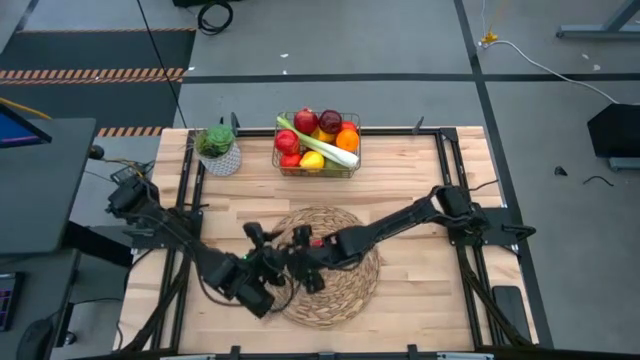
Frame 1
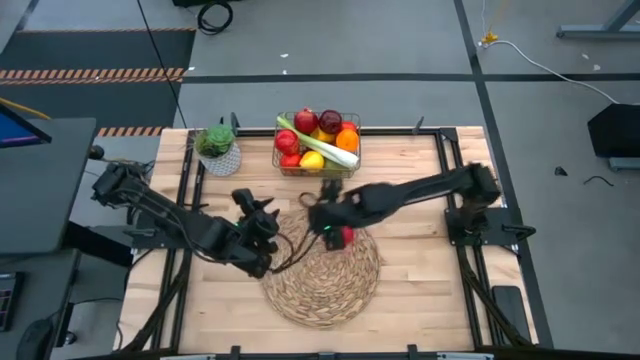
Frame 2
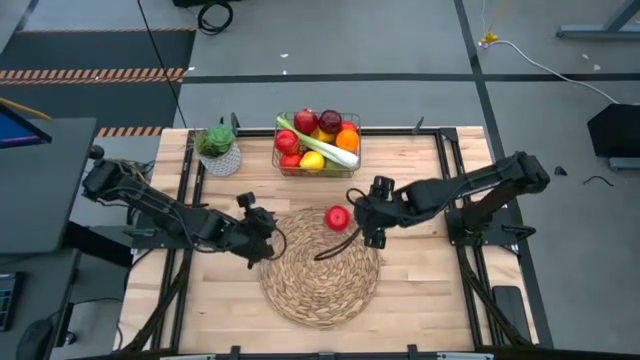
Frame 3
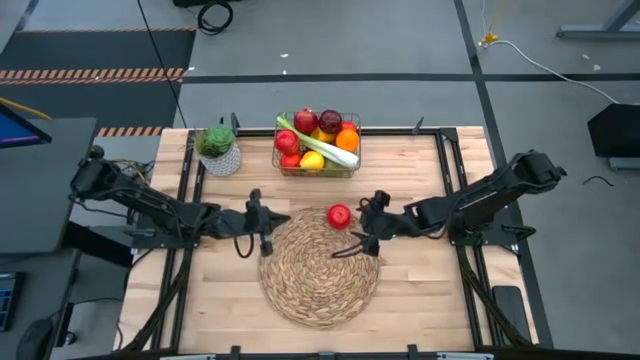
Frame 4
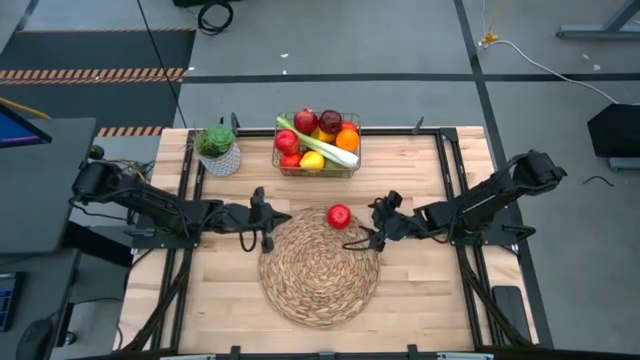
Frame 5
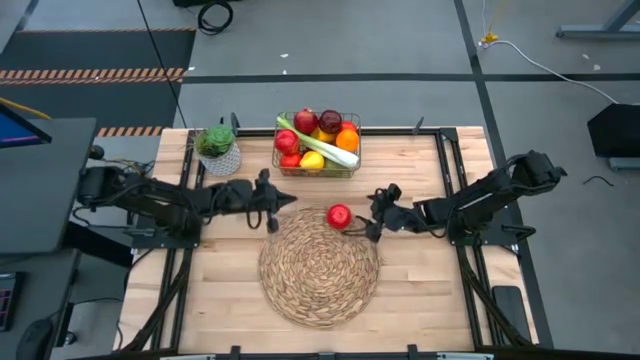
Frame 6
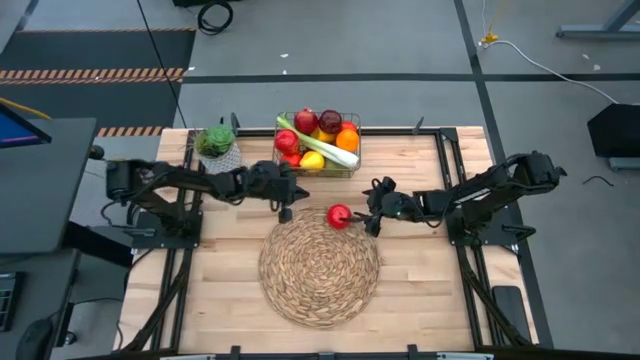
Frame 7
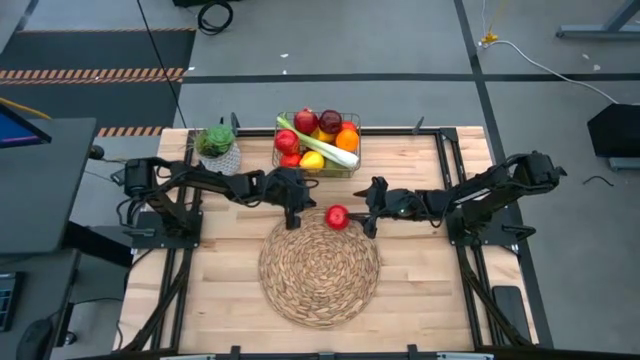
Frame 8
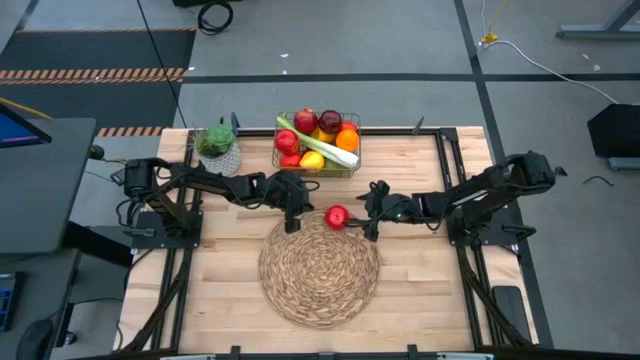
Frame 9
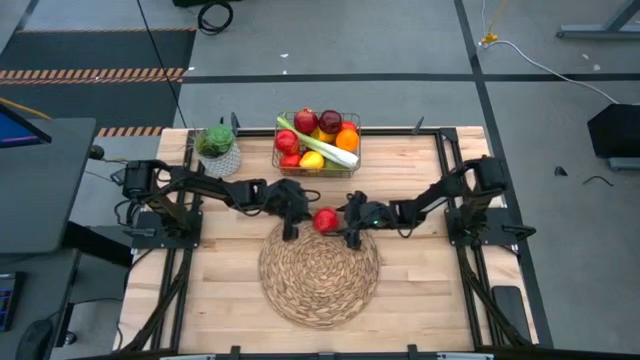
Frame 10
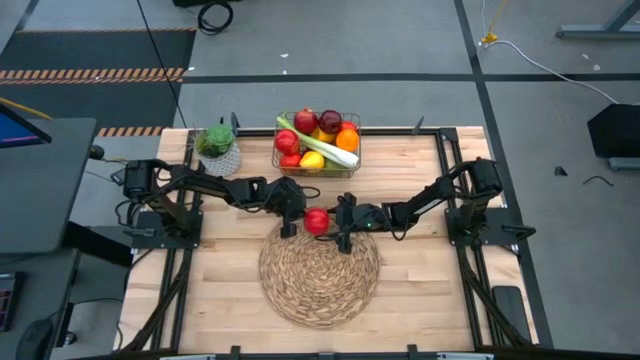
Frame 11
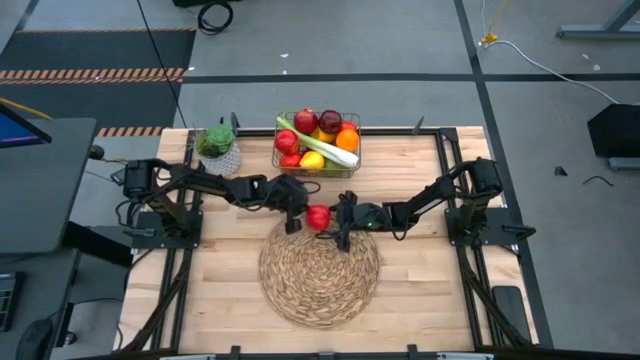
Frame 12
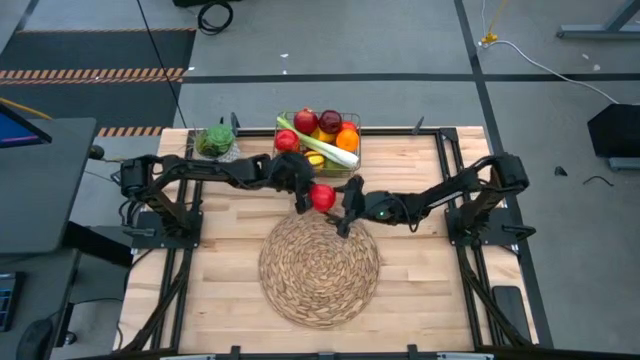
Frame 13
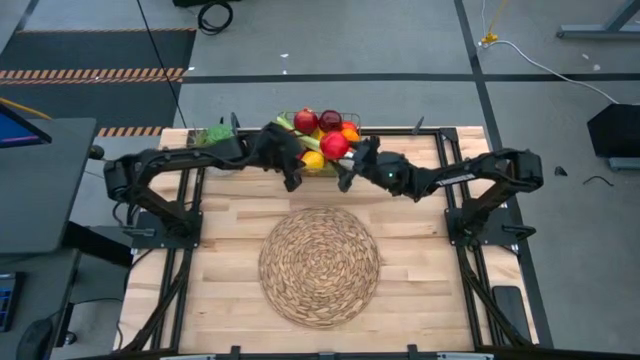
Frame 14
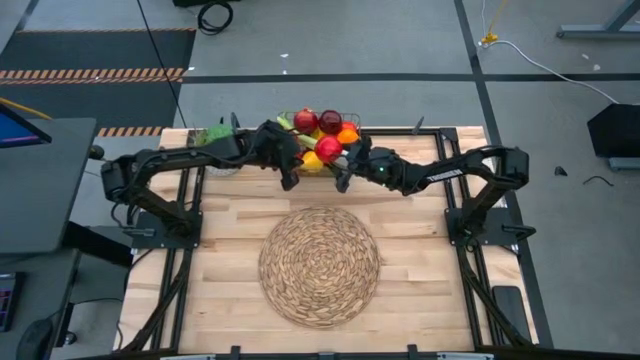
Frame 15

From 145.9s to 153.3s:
Task: Build produce basket
Put the apple into the wire basket

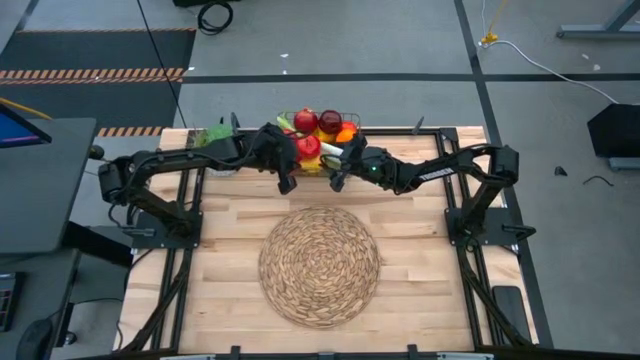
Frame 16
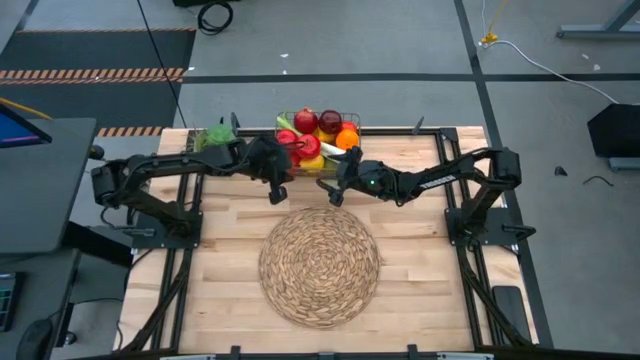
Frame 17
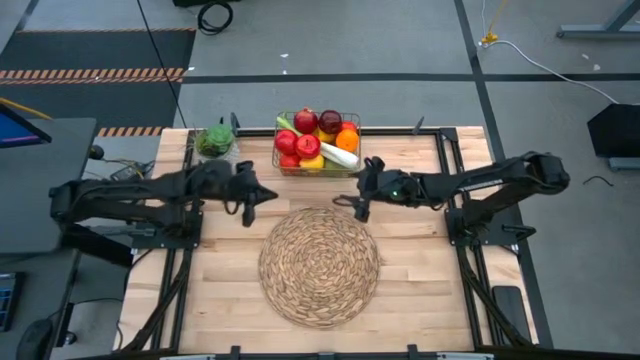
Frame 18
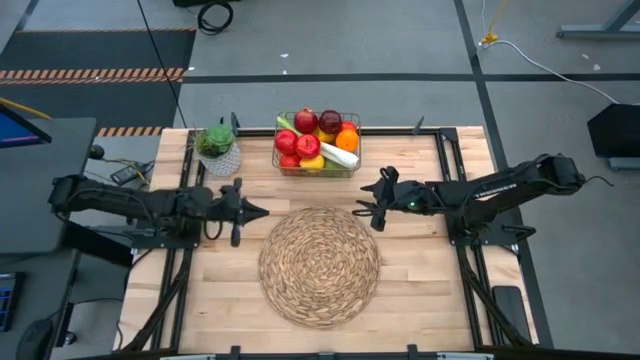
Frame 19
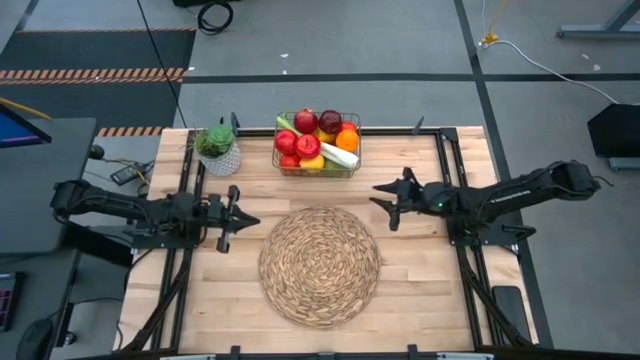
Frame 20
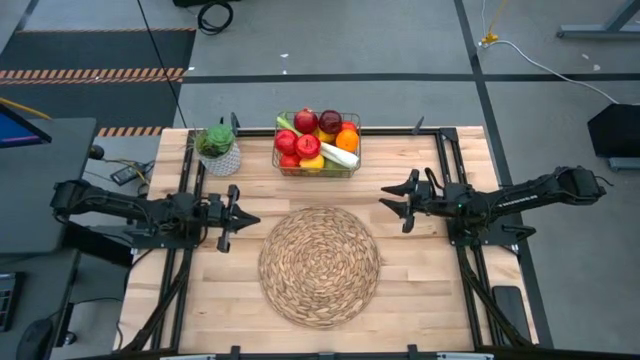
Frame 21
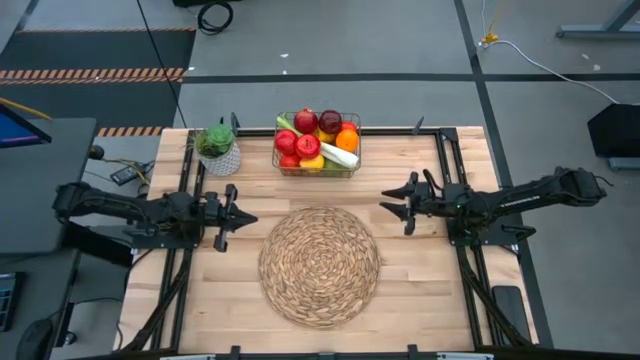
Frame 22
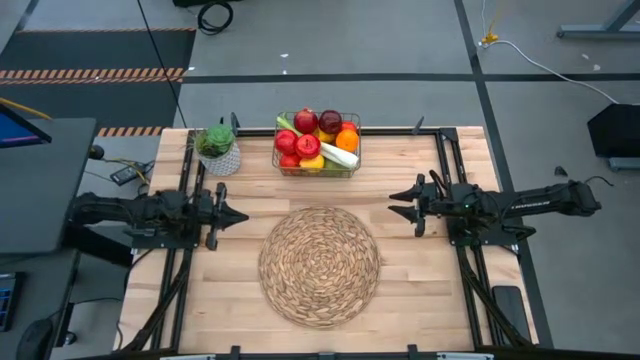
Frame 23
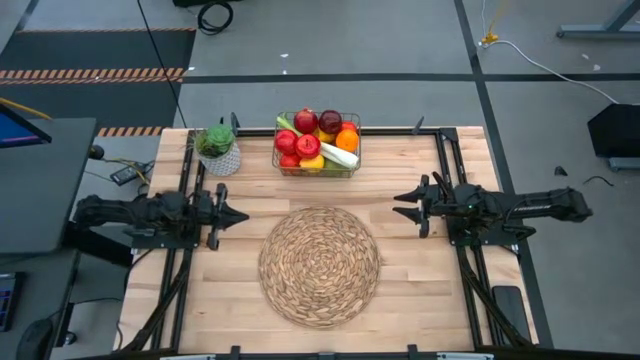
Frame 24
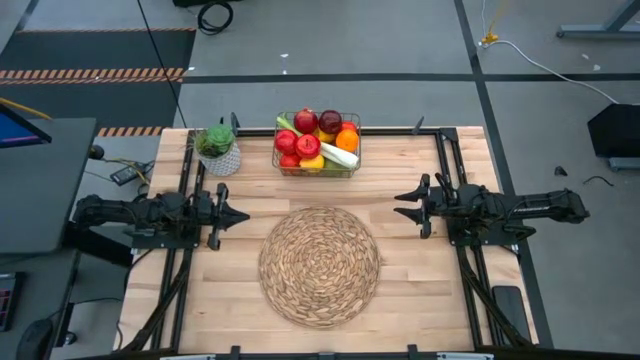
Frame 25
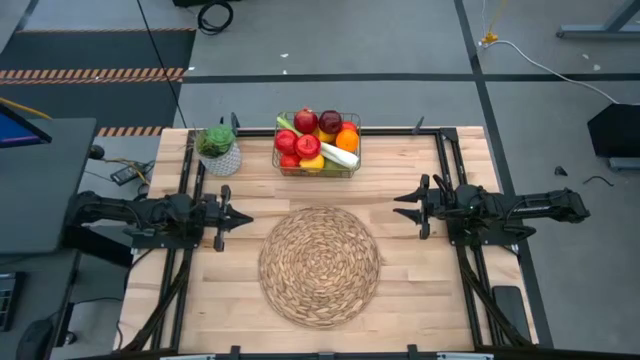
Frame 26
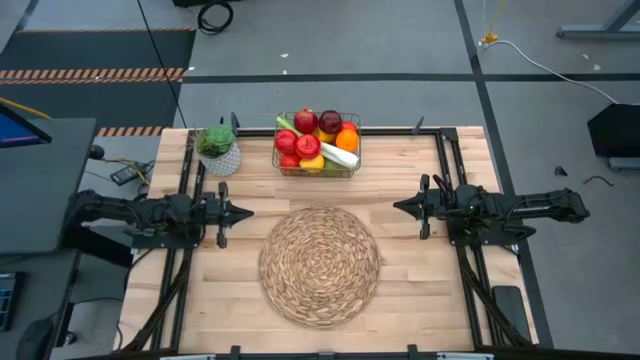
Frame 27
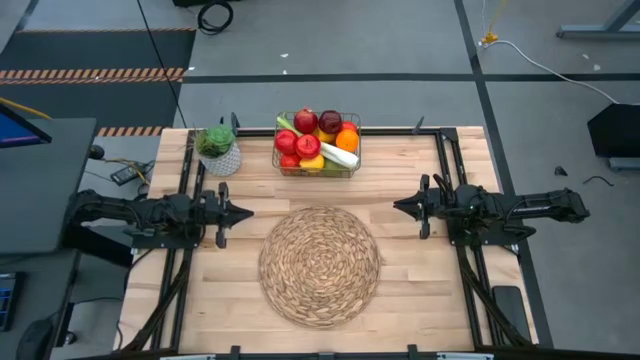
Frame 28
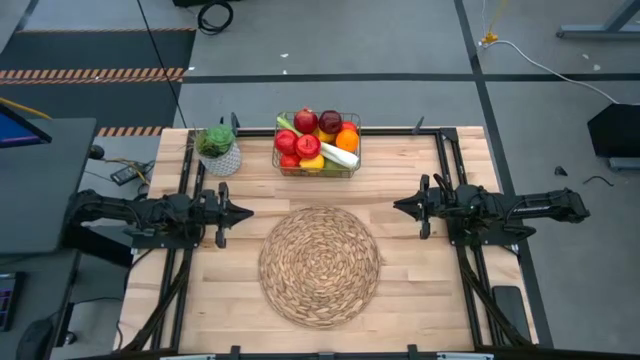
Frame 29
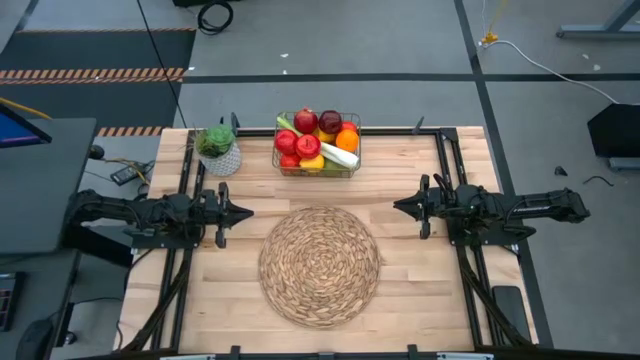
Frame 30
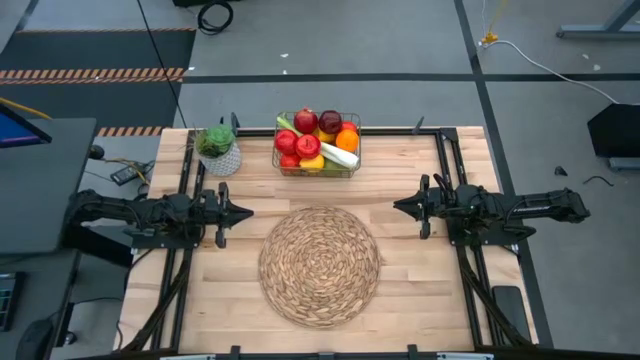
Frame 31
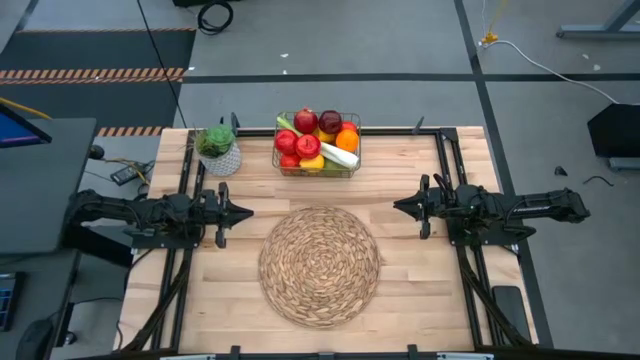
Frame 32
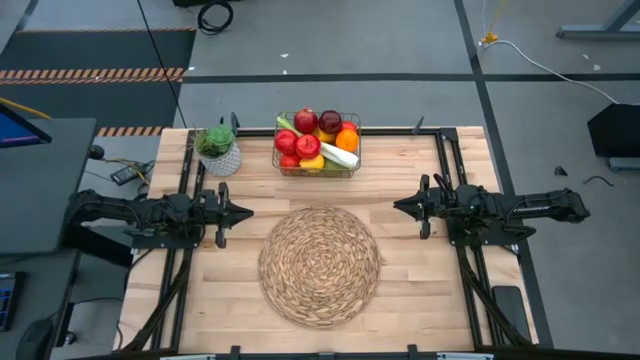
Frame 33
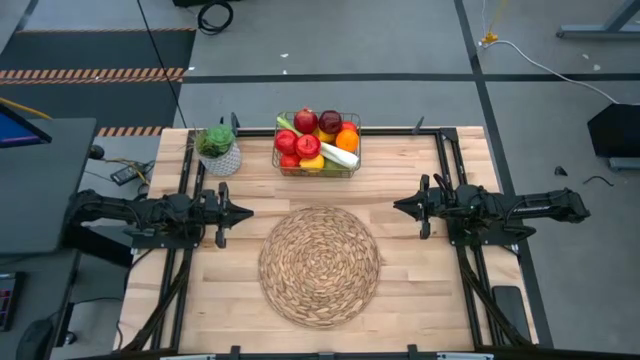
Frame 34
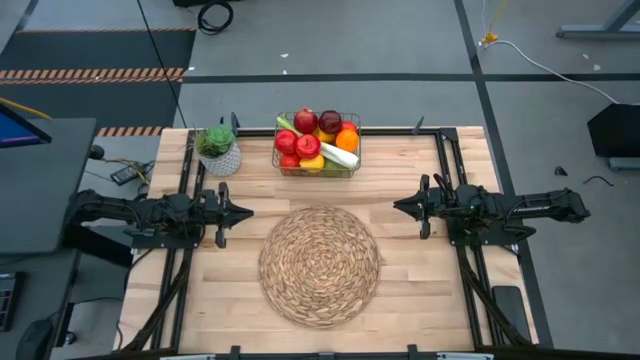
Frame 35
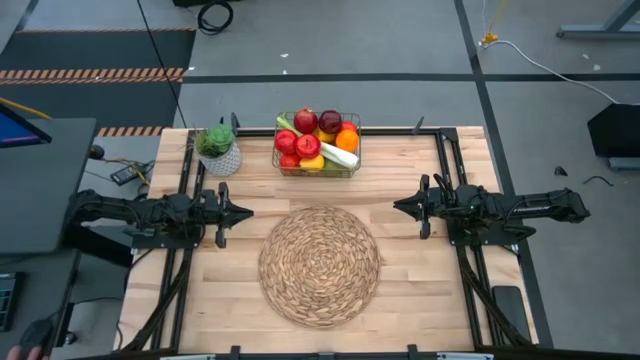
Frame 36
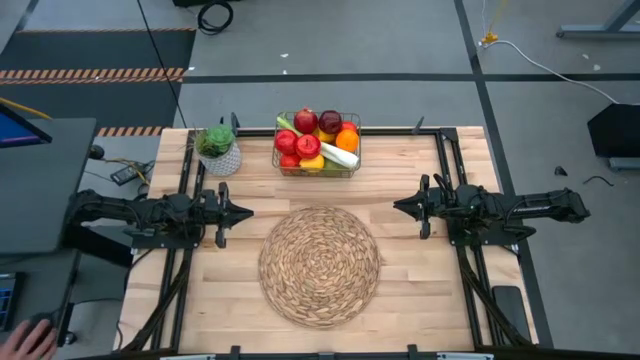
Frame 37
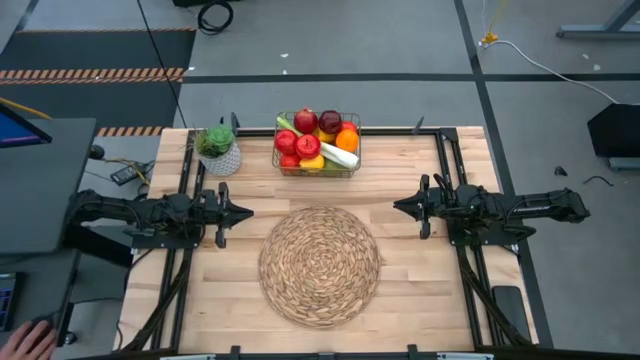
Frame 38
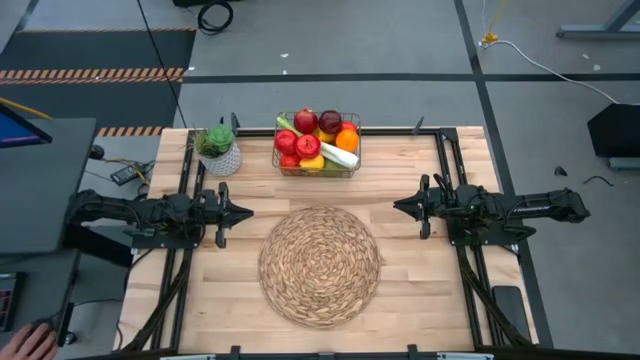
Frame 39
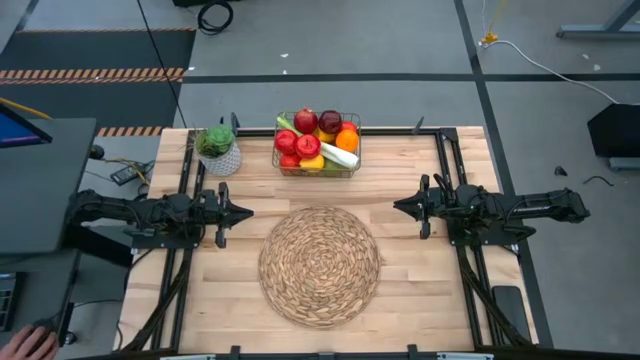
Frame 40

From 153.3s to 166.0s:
Return to Home Position
